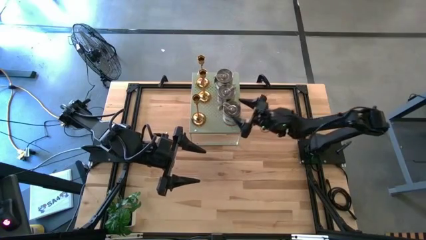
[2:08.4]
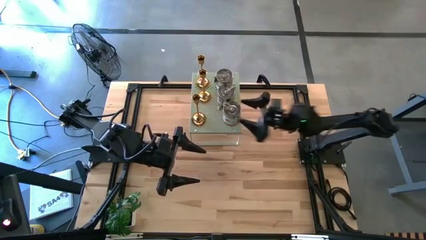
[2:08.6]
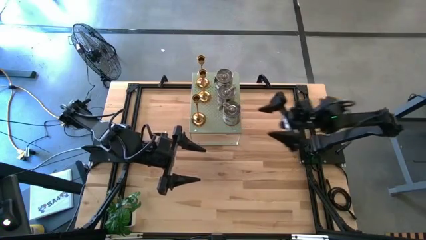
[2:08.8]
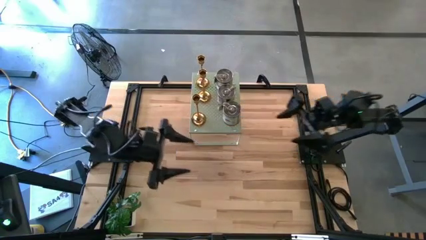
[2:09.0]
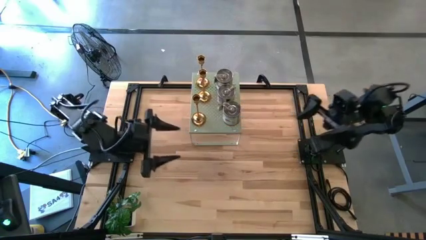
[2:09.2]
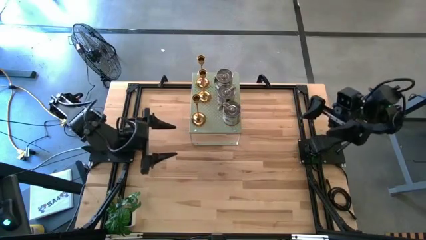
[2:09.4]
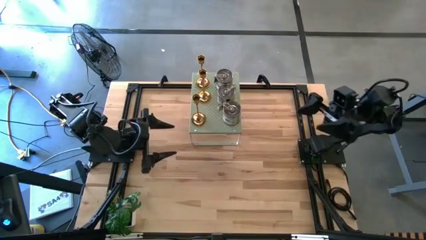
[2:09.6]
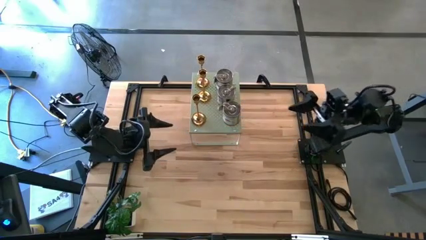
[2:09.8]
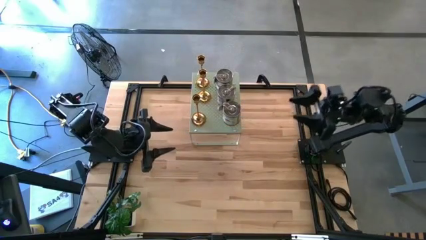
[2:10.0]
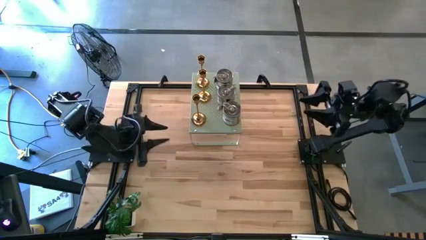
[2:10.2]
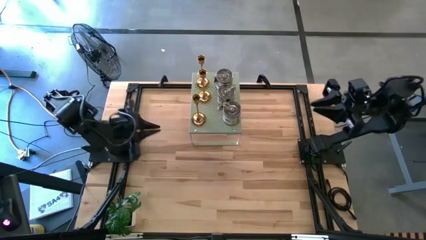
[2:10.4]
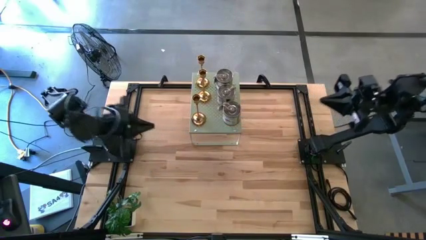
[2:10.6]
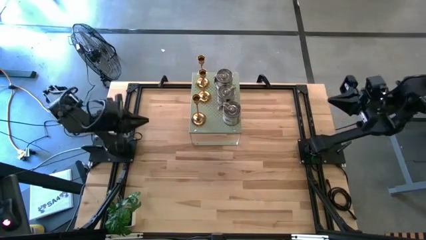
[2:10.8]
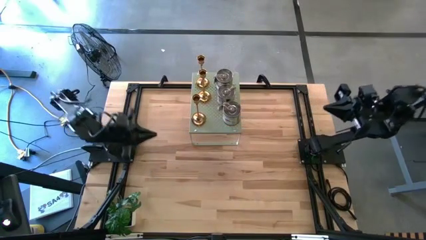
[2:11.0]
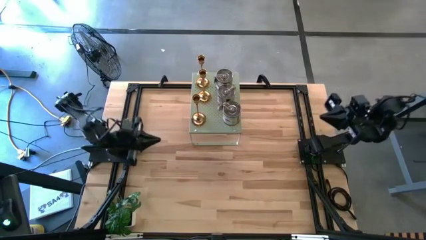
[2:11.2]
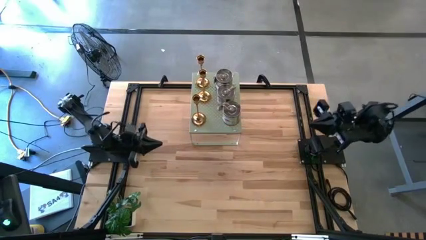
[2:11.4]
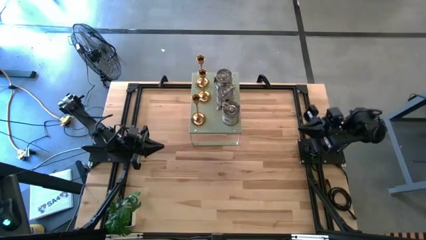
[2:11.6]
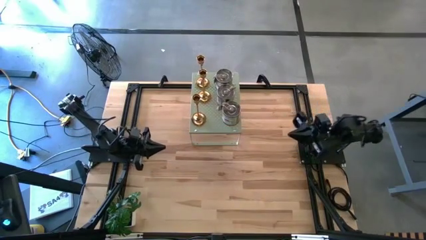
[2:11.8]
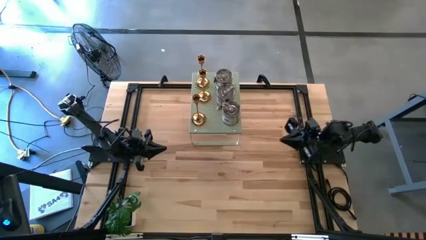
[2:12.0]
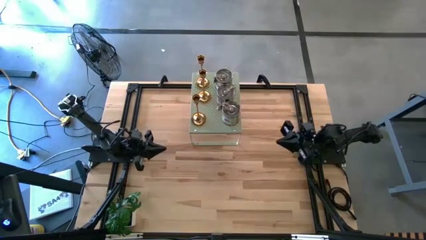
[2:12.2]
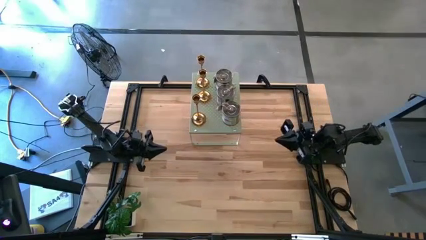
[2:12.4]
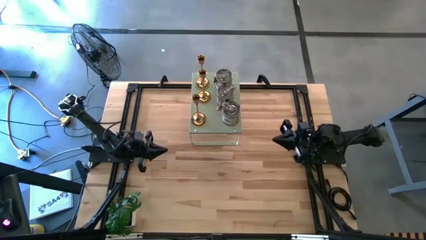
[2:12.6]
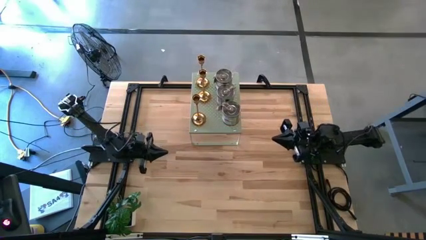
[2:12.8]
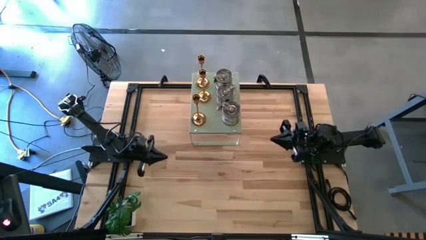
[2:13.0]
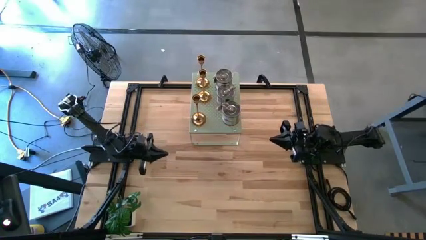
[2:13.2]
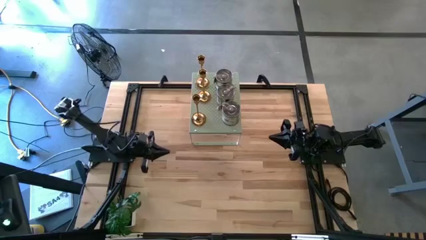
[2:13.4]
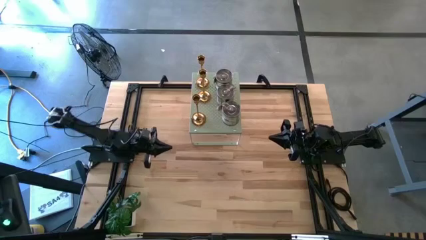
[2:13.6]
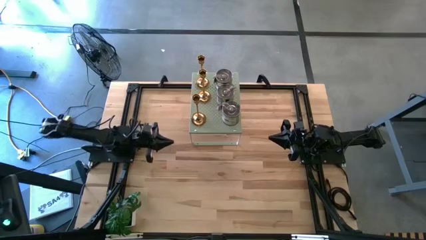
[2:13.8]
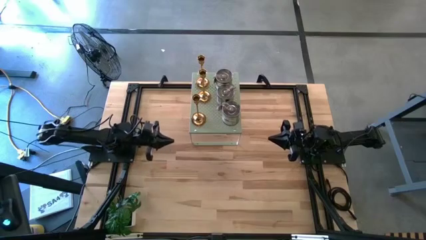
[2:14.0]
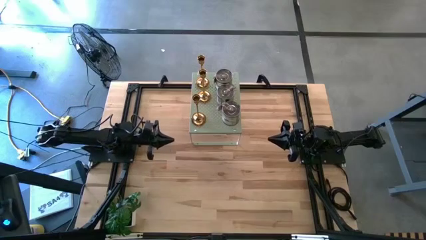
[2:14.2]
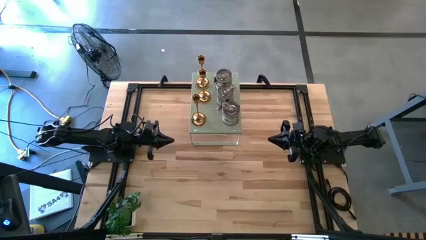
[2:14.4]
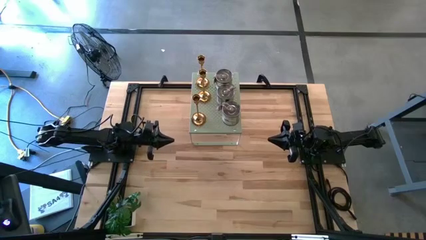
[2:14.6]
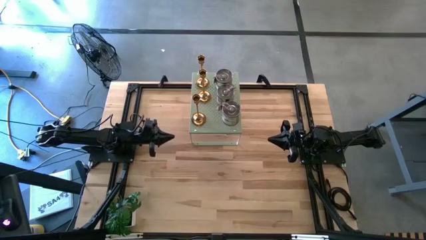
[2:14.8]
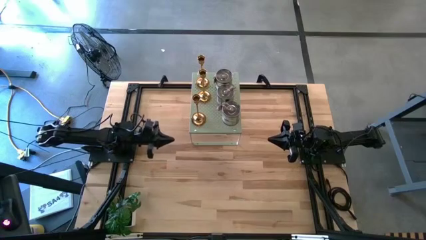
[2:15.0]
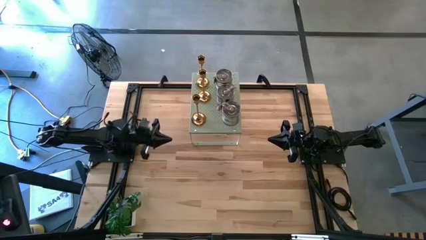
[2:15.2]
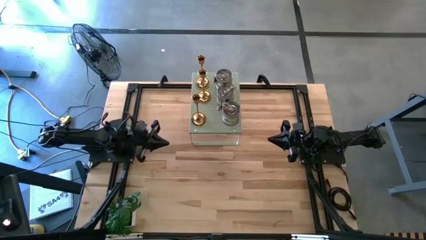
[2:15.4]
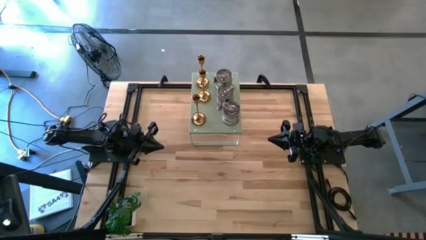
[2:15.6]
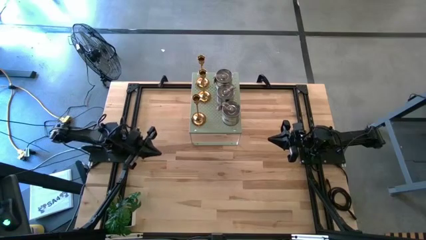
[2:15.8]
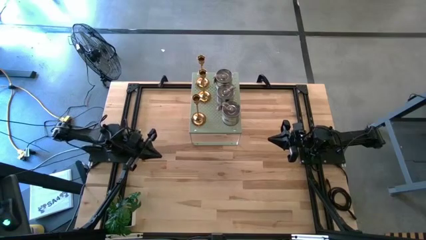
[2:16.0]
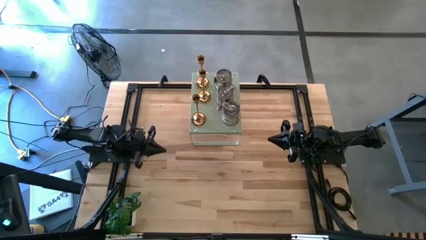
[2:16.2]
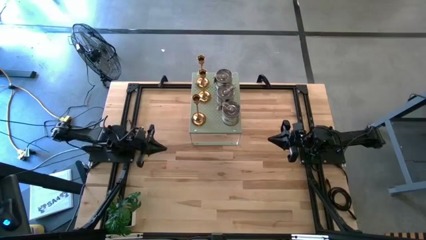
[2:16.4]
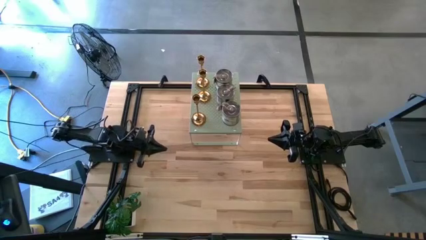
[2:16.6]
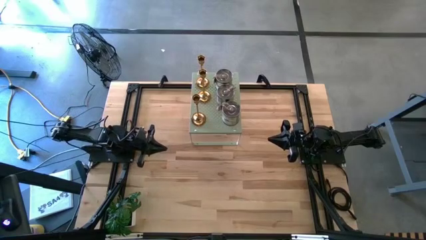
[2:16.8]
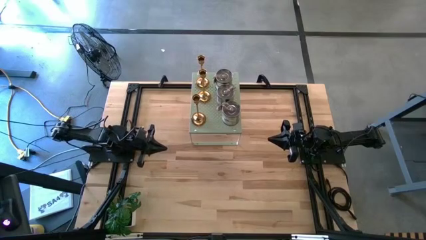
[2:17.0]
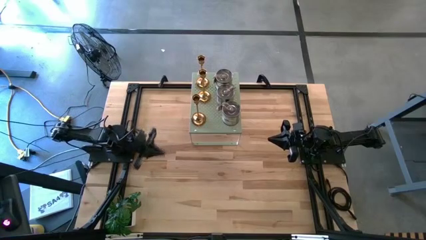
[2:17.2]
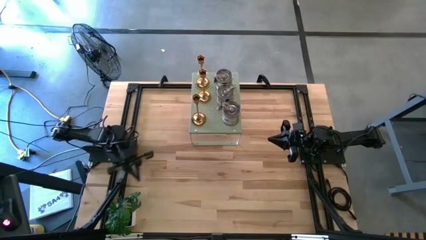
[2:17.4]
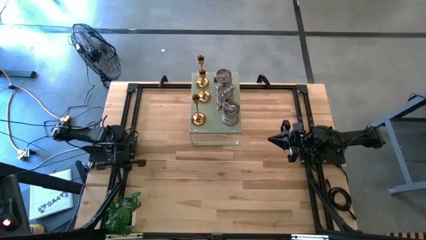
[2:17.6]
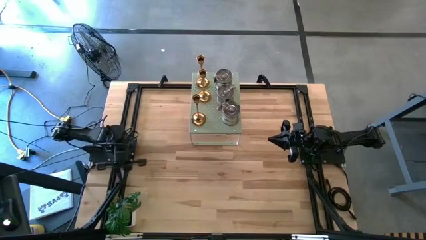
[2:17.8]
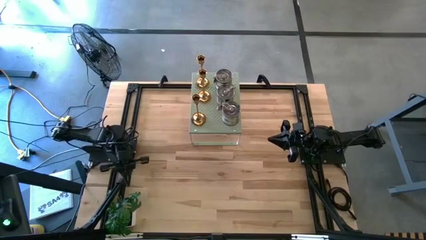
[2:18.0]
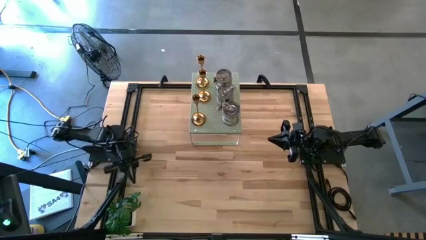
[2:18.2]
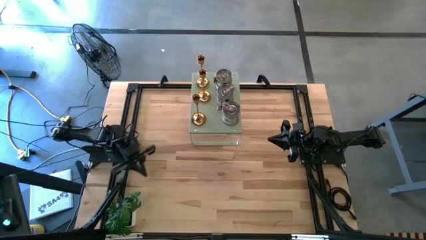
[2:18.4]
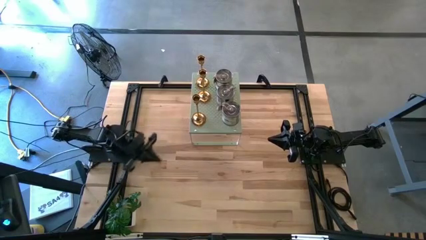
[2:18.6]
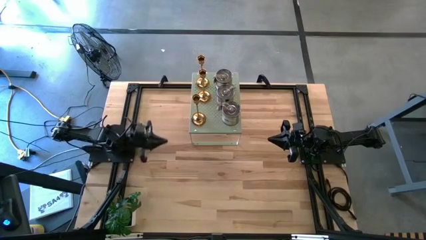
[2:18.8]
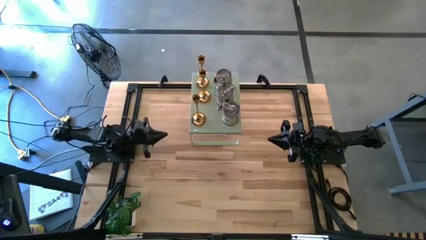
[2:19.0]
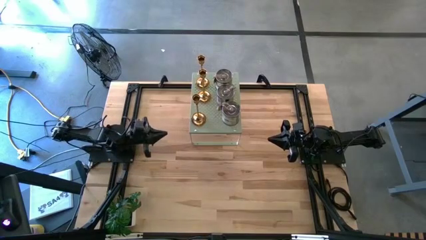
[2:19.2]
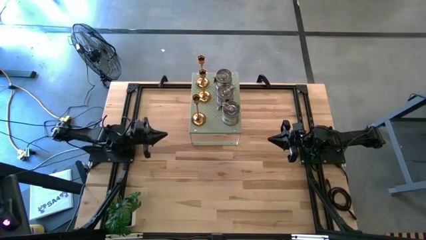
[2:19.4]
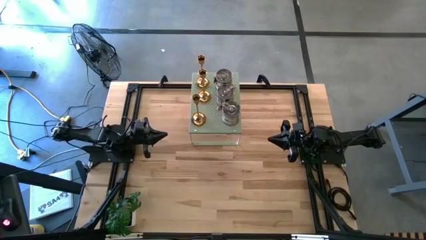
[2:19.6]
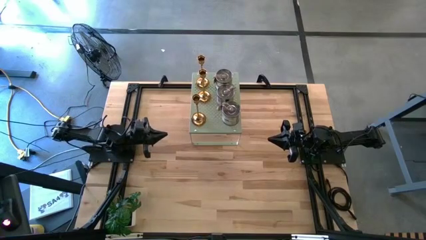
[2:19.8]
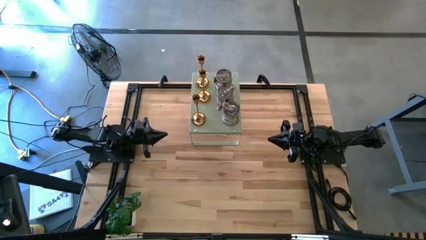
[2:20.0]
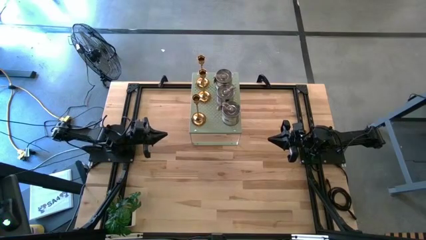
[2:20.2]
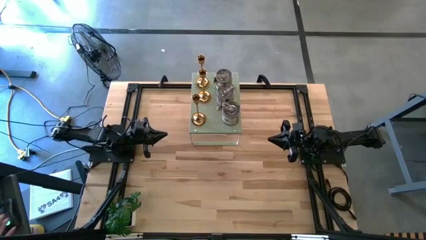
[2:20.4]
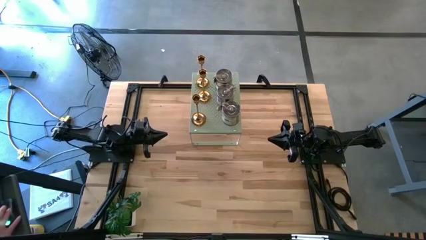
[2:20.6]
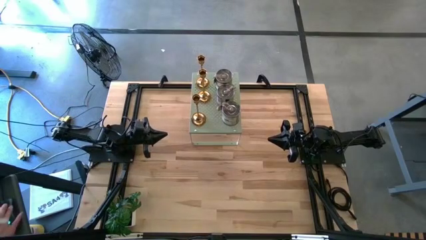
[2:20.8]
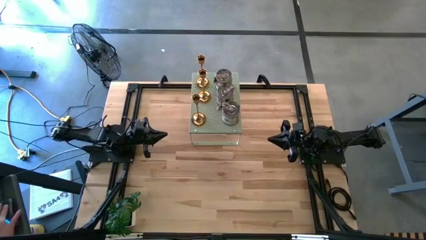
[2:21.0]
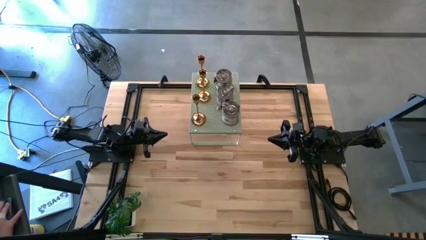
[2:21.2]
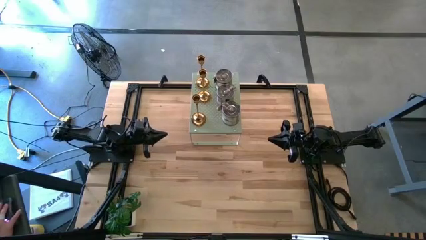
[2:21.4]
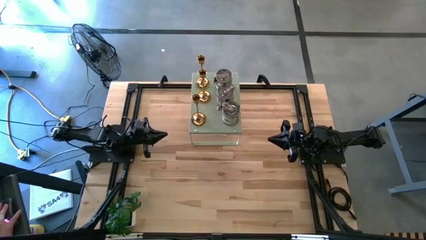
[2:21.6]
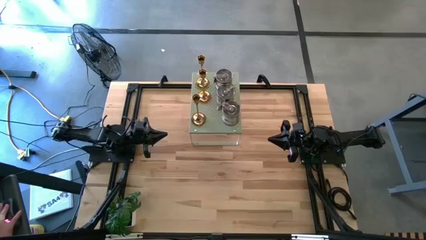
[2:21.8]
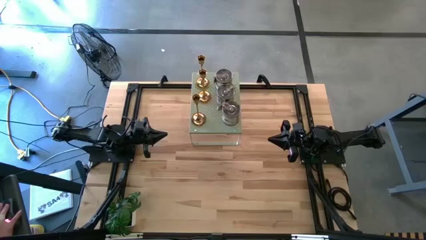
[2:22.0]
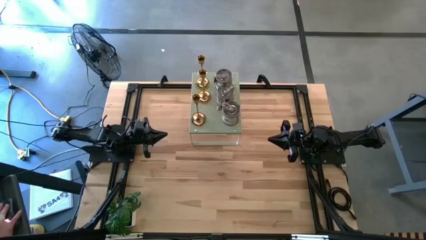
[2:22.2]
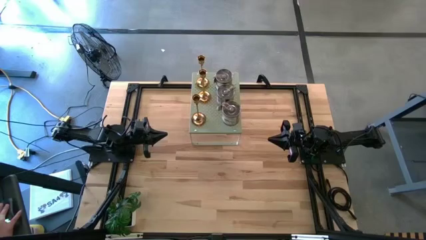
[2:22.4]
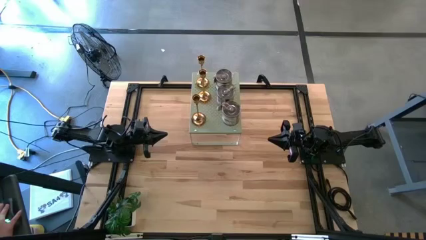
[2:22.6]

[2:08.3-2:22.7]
Task: Pick & Place candle stick holders
Return to Home Position

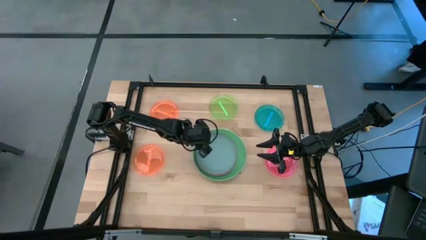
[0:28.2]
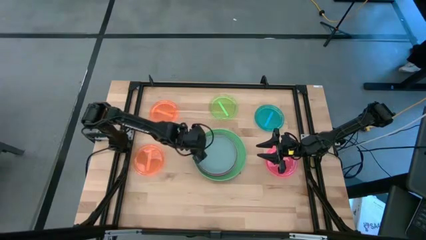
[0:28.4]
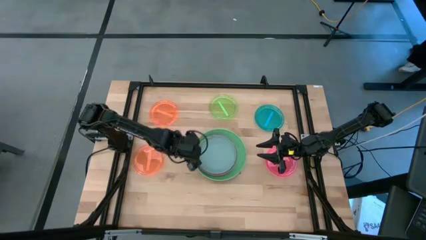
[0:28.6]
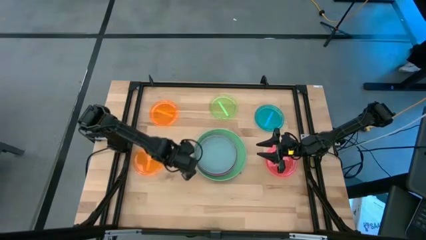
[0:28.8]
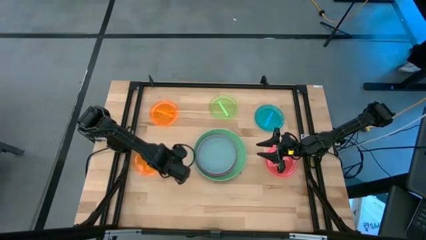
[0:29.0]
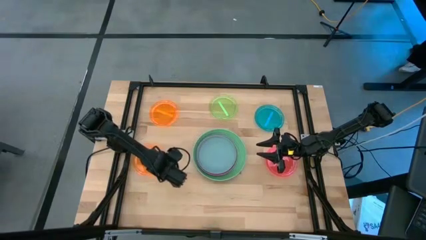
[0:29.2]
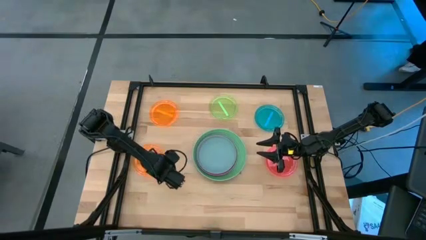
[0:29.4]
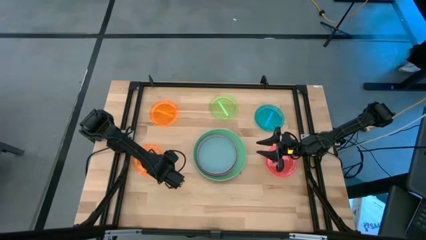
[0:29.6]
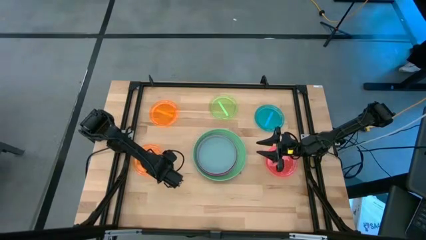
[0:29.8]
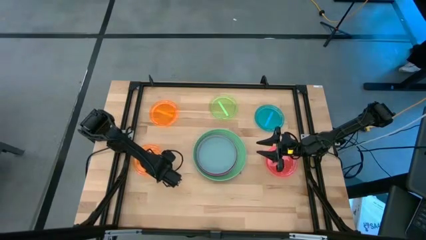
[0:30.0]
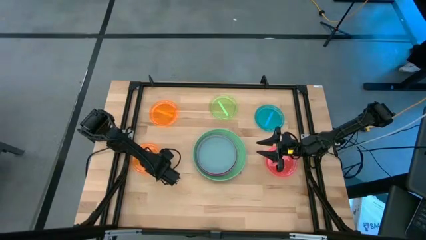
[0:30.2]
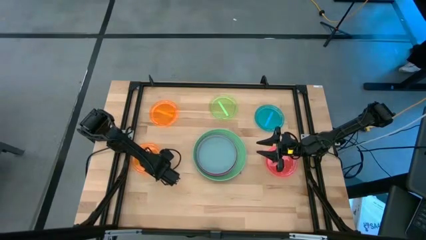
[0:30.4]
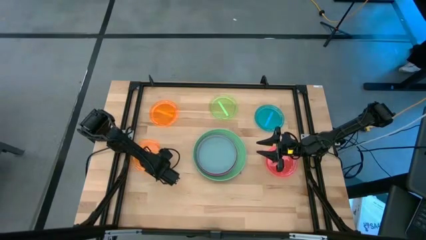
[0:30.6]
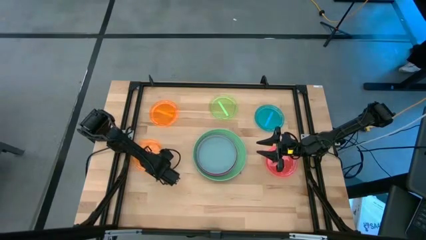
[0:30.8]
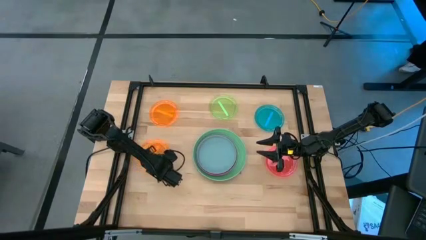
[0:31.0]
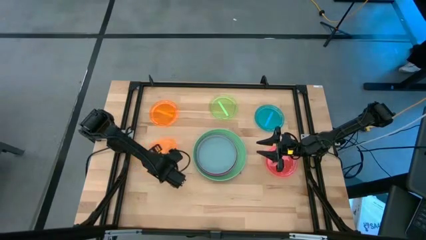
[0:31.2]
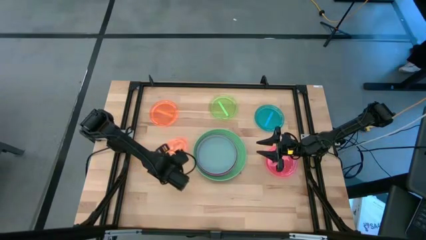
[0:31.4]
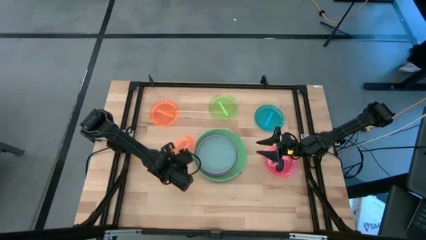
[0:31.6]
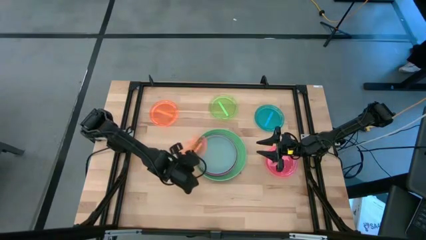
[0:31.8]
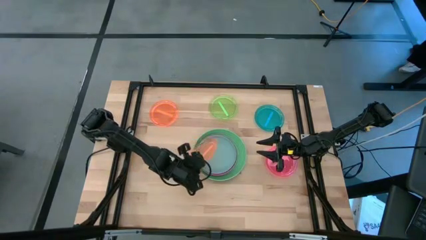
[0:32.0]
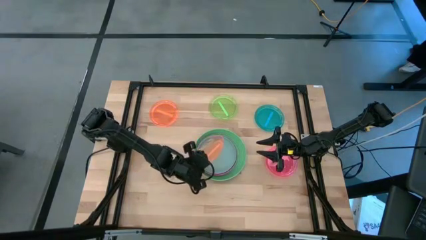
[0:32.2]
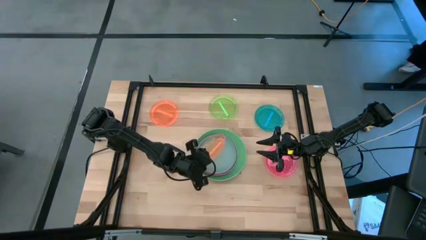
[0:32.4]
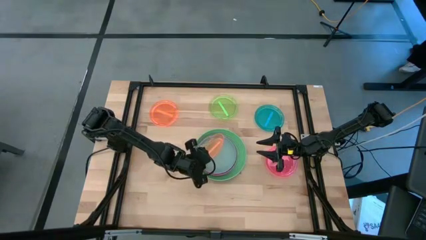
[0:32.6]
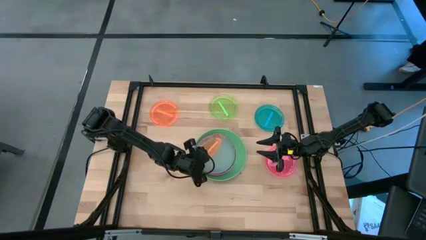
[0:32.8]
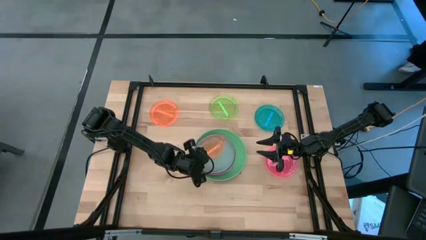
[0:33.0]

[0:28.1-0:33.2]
Task: Stack plastic plates
Stack the bottom orange plate on top of the light blue plate
